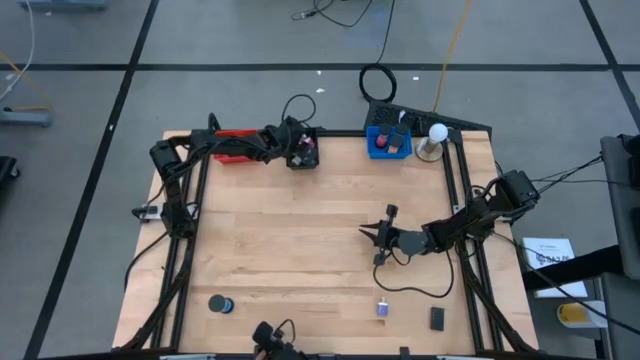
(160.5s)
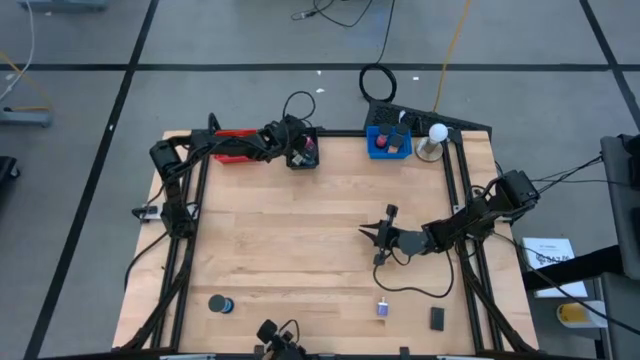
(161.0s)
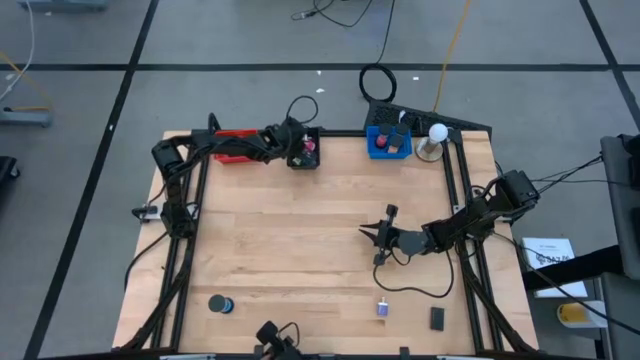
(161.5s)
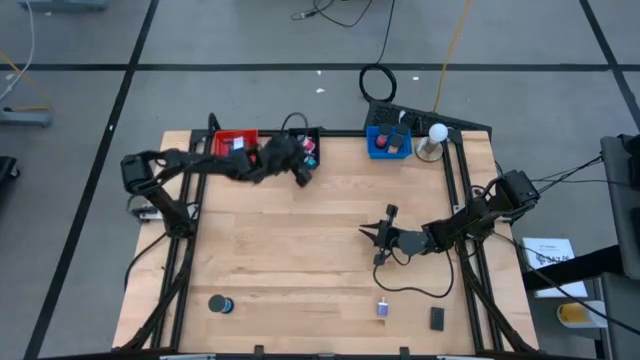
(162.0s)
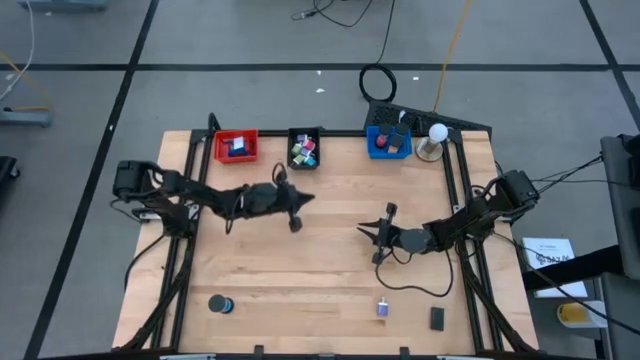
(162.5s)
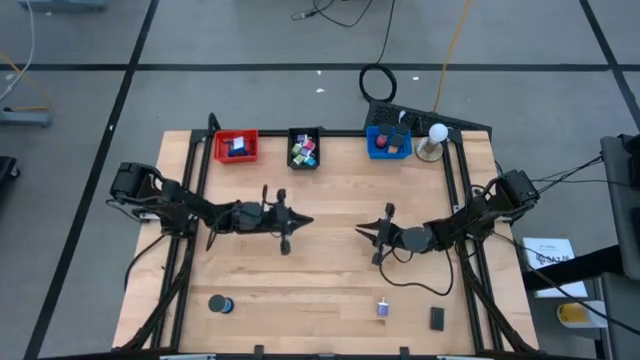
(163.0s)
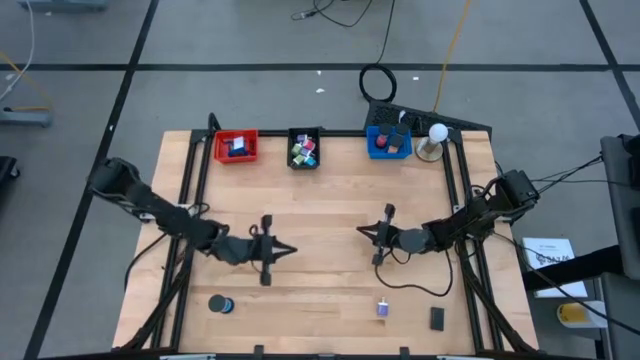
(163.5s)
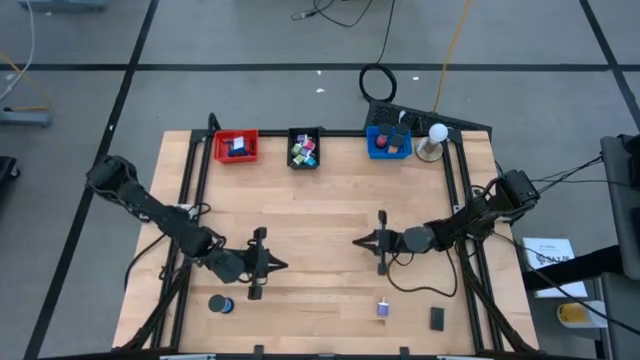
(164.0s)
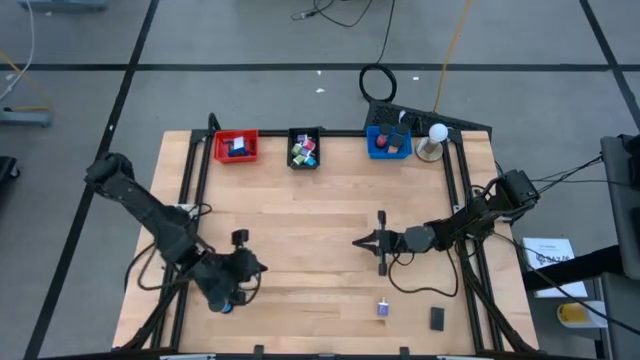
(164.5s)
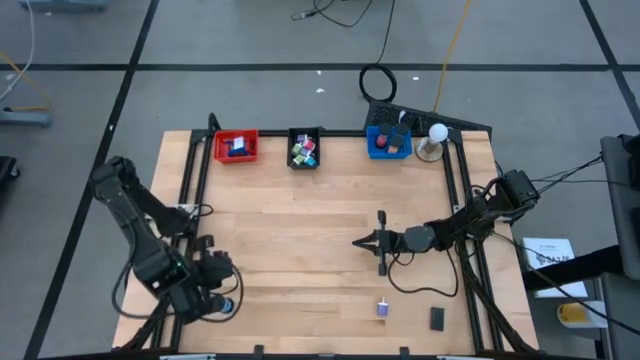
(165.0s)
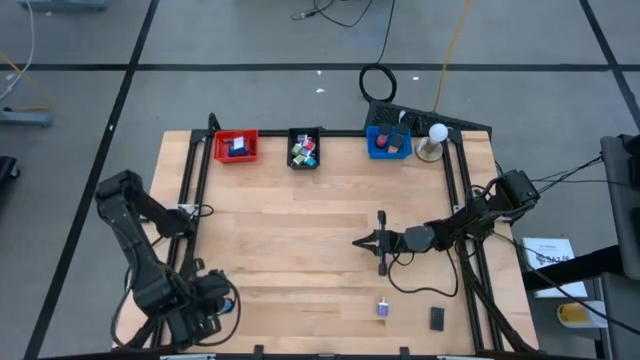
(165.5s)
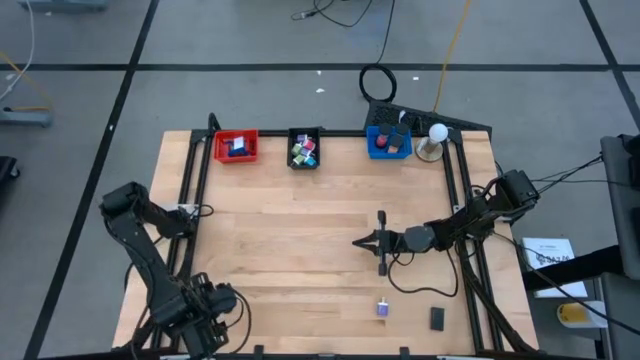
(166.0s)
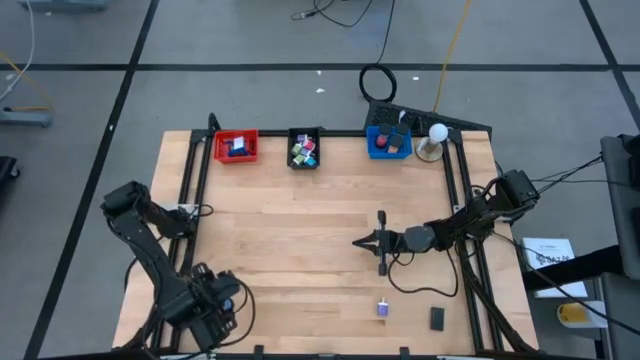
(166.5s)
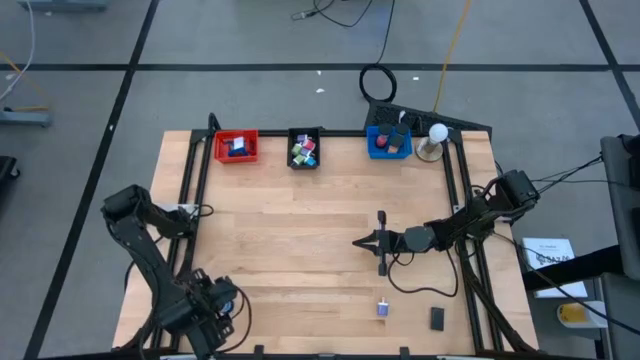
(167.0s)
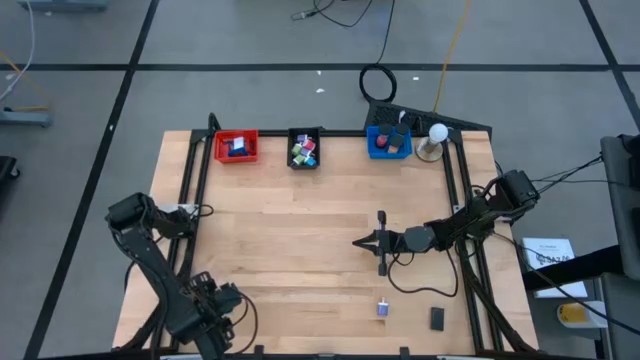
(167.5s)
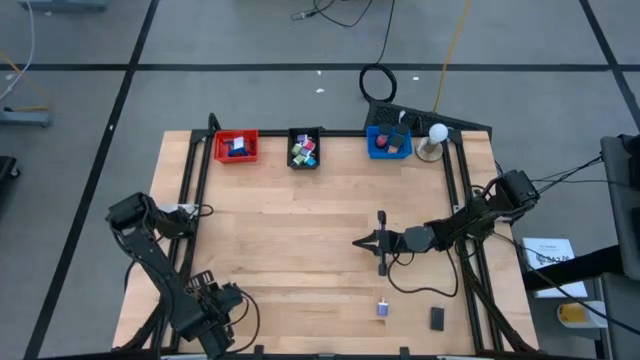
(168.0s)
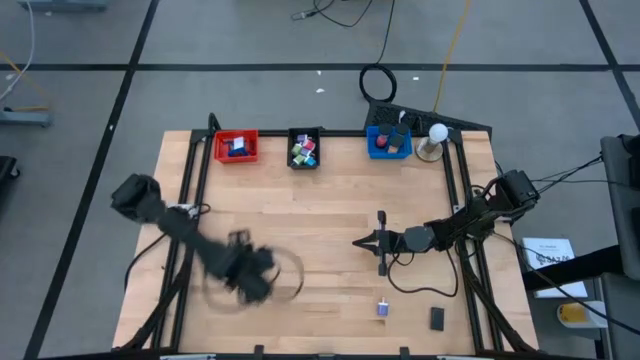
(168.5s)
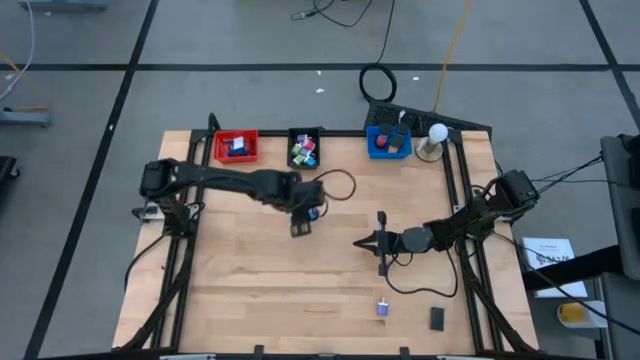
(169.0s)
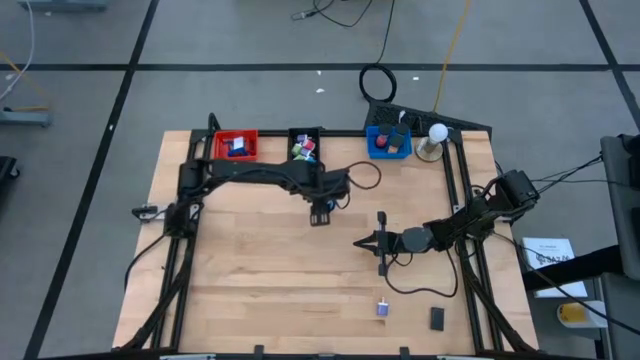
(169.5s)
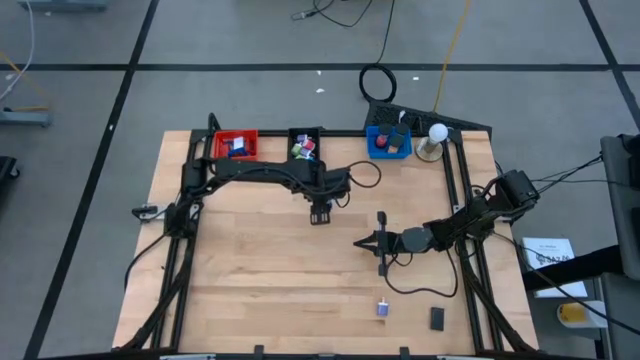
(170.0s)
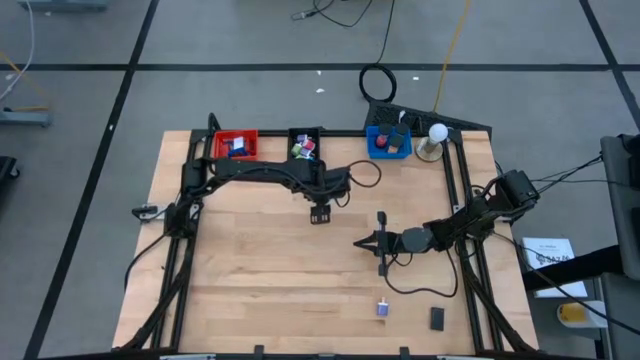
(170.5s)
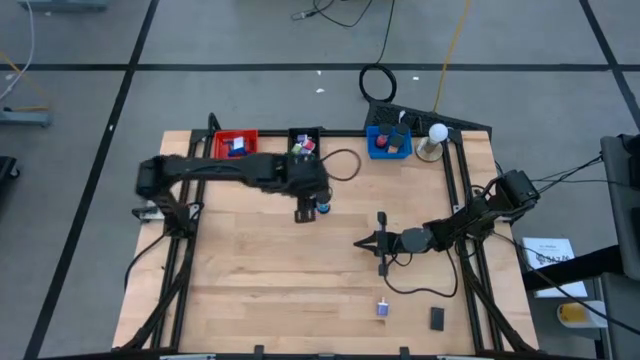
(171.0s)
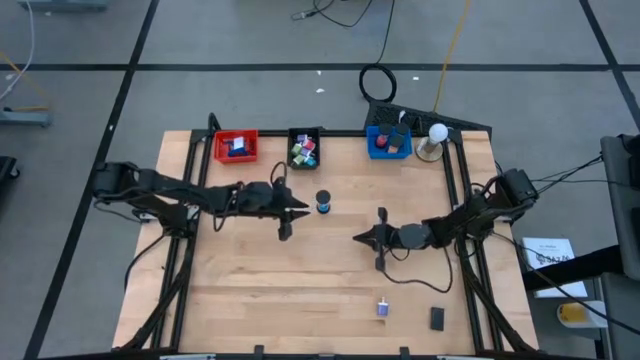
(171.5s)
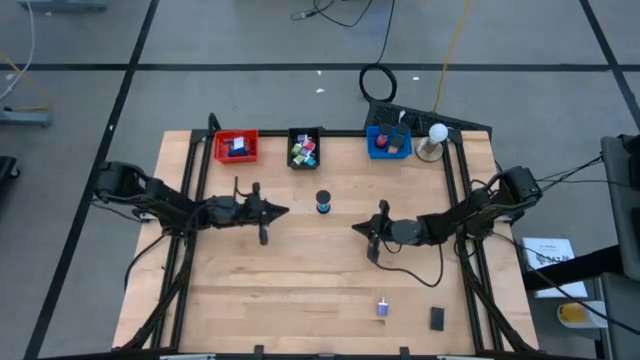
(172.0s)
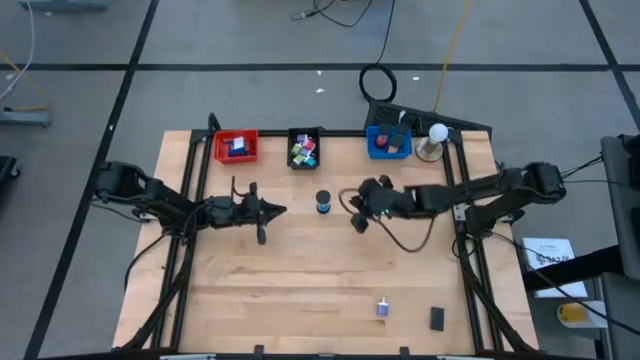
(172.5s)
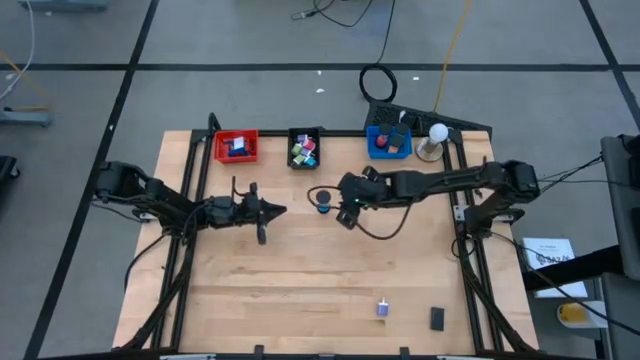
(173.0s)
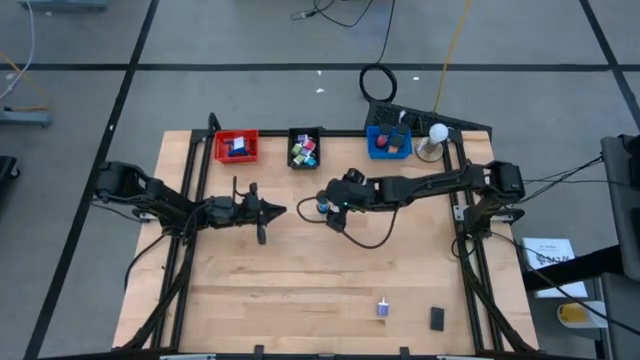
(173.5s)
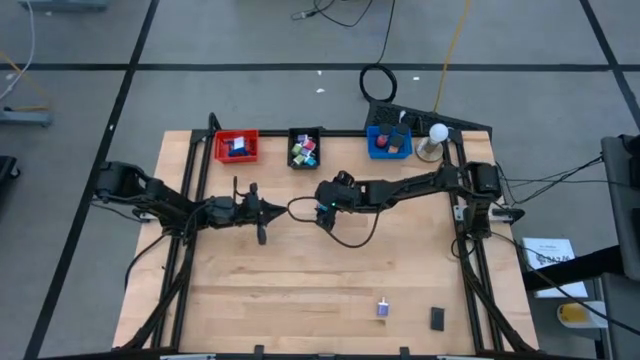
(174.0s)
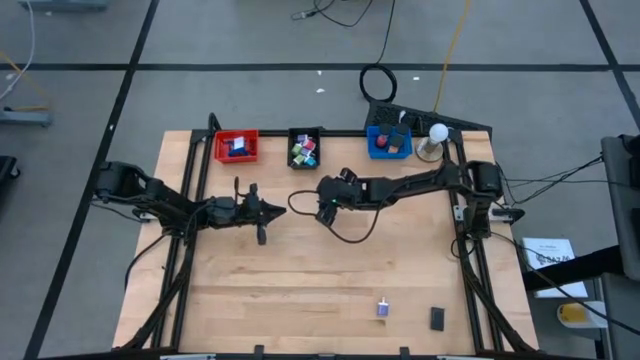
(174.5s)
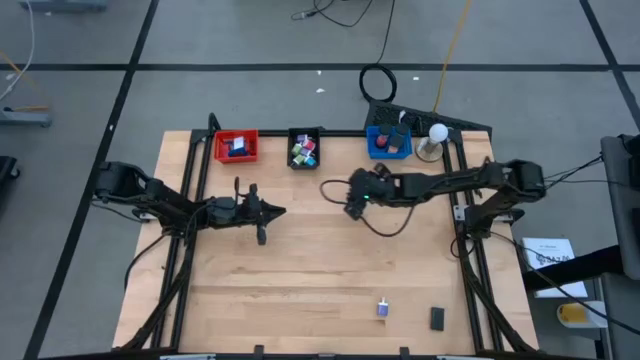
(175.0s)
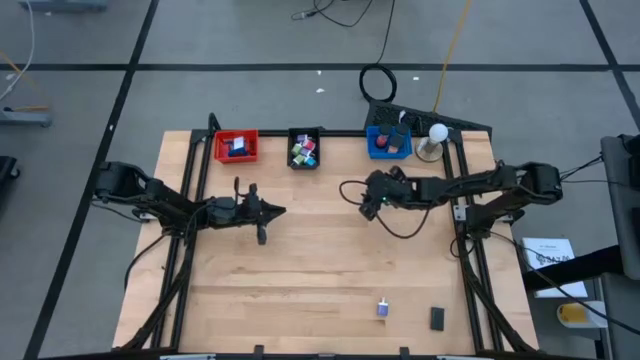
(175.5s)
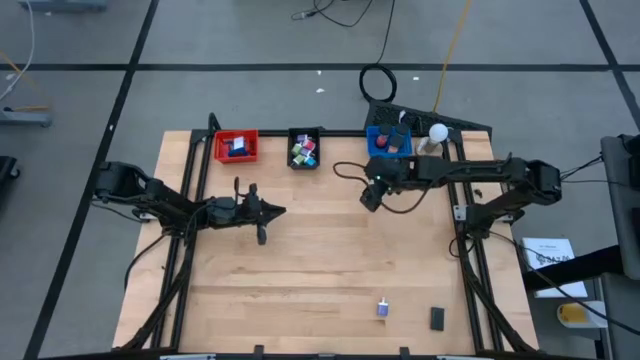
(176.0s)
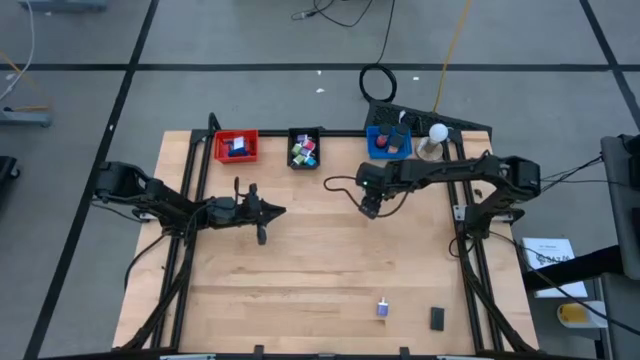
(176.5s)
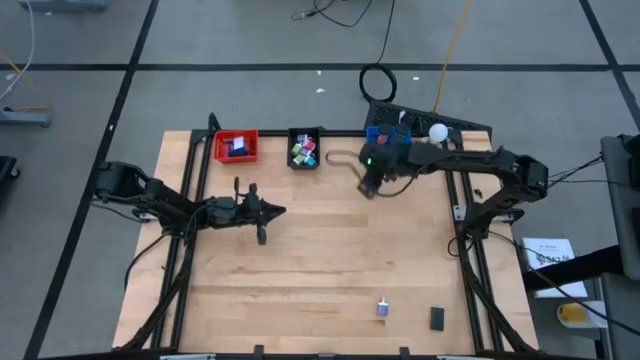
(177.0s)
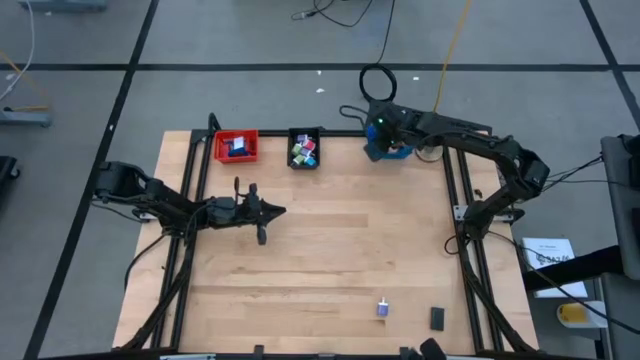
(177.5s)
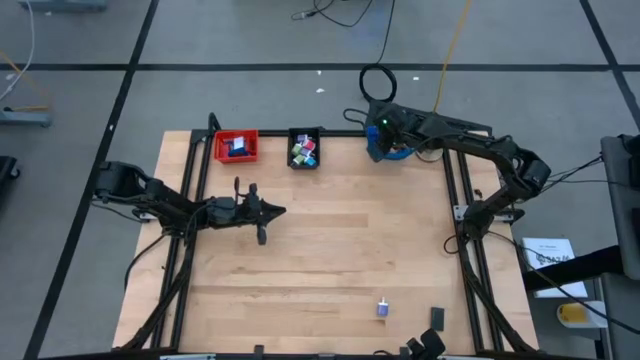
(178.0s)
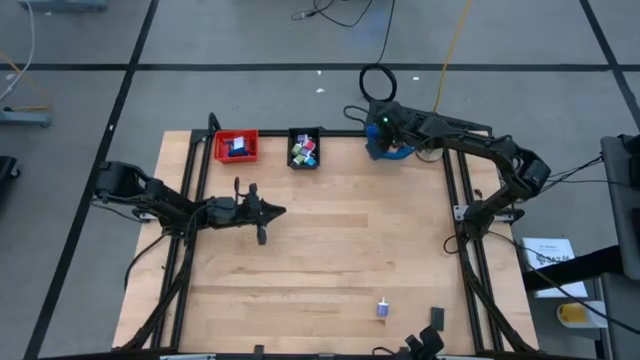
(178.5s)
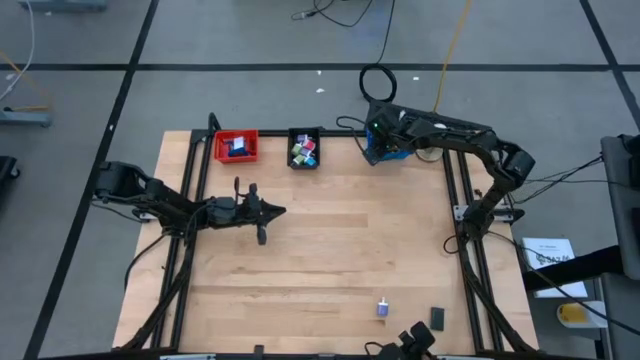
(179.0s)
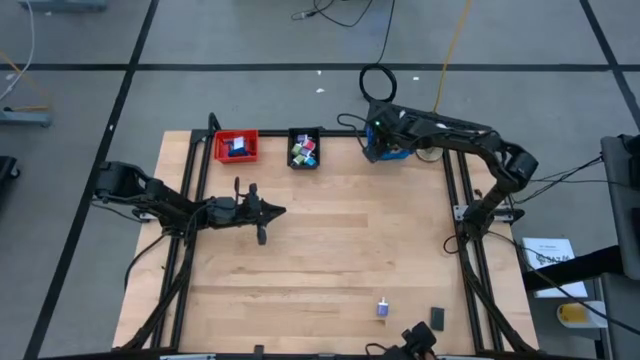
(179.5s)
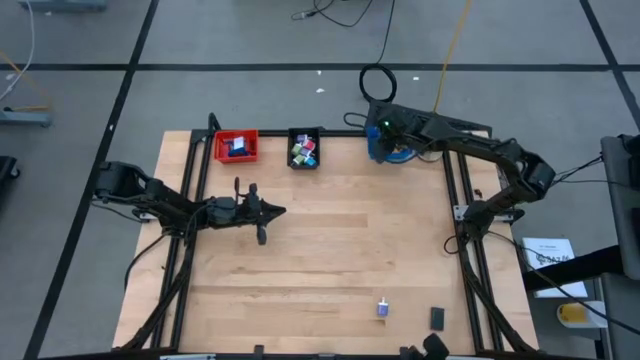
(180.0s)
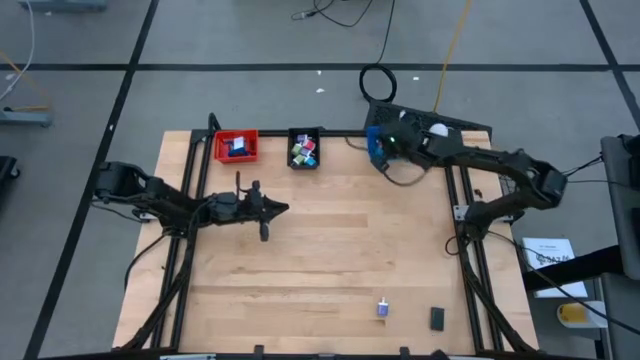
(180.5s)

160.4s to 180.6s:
Task: Pick & Place Office items
Put the blue hourglass into the blue bin
